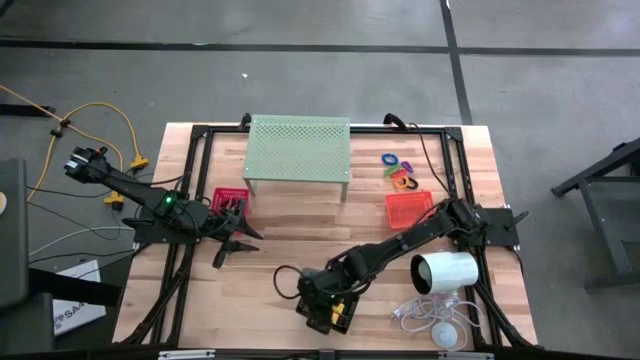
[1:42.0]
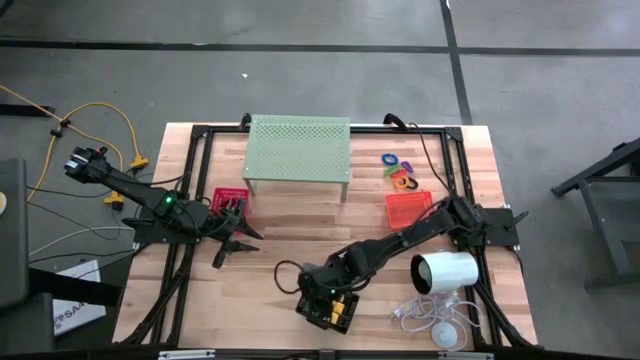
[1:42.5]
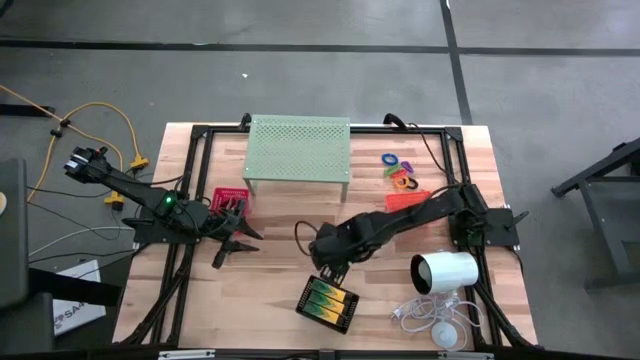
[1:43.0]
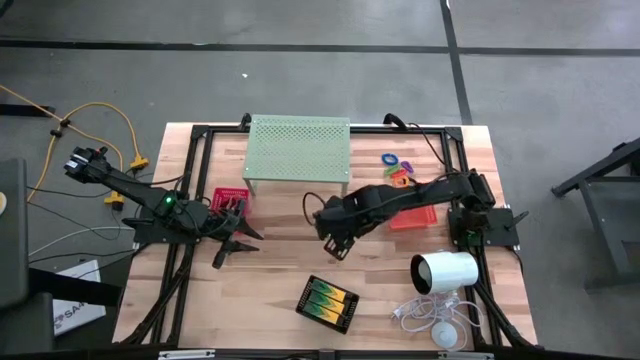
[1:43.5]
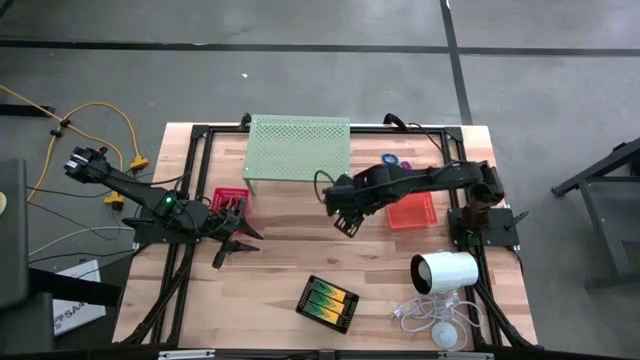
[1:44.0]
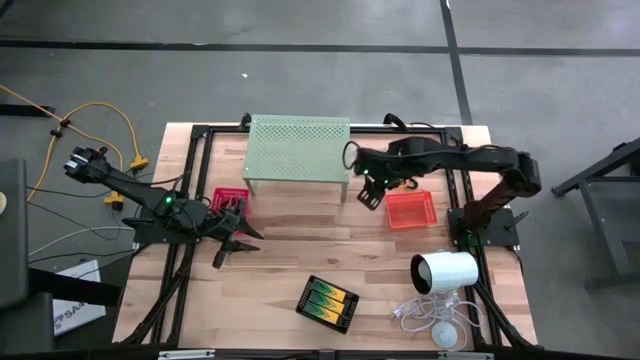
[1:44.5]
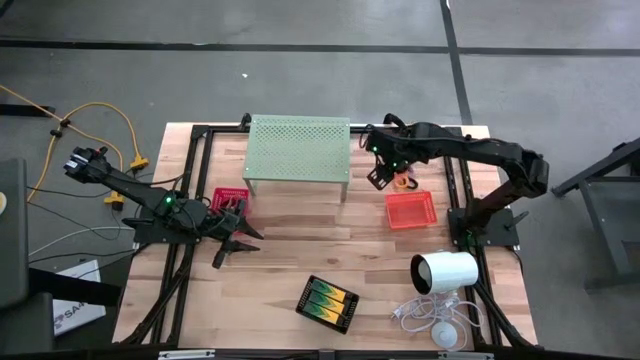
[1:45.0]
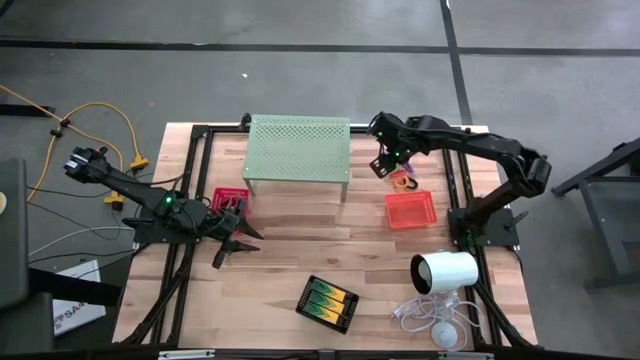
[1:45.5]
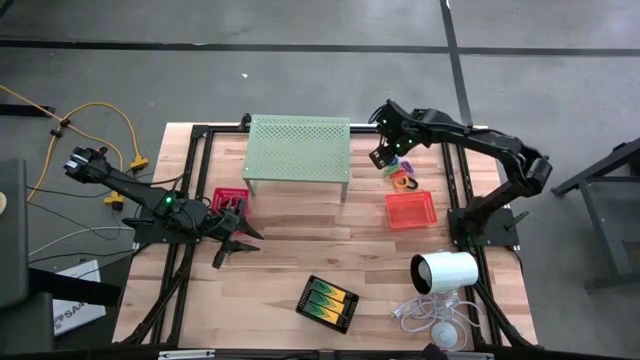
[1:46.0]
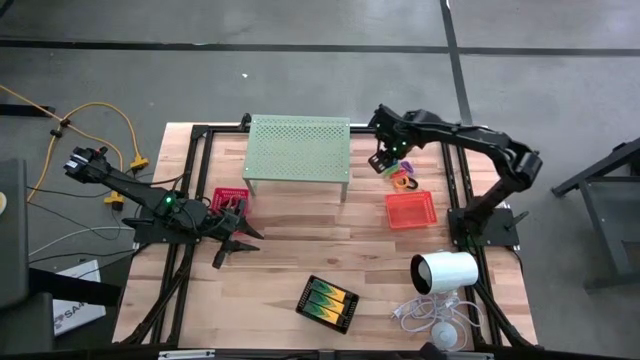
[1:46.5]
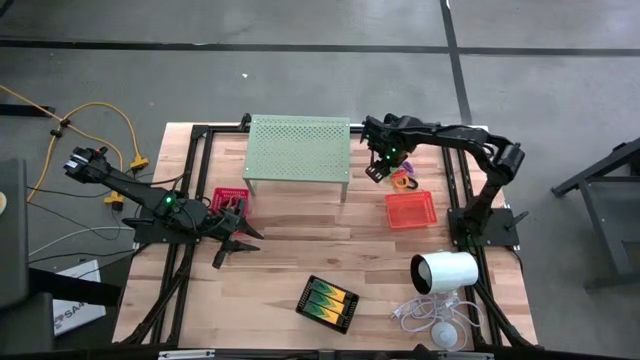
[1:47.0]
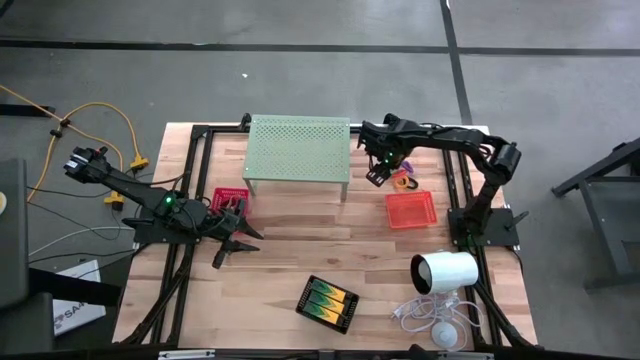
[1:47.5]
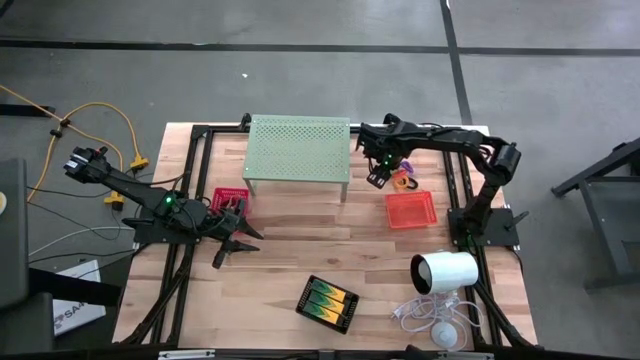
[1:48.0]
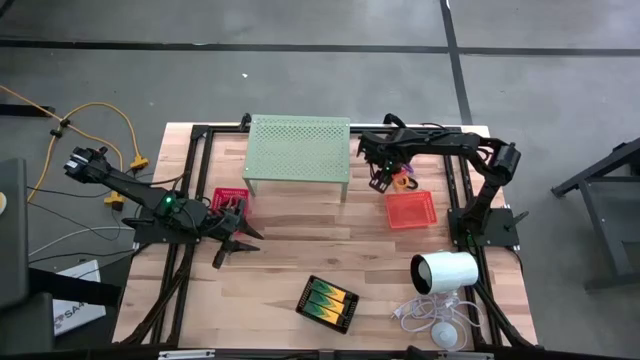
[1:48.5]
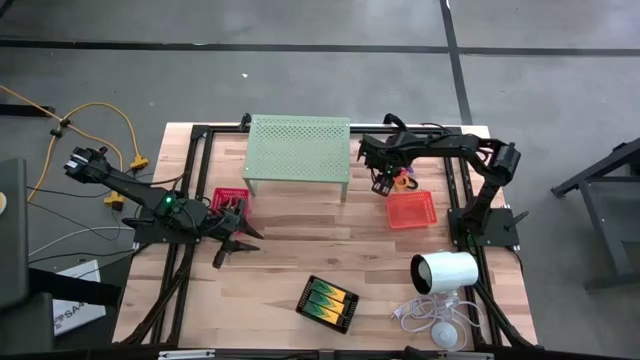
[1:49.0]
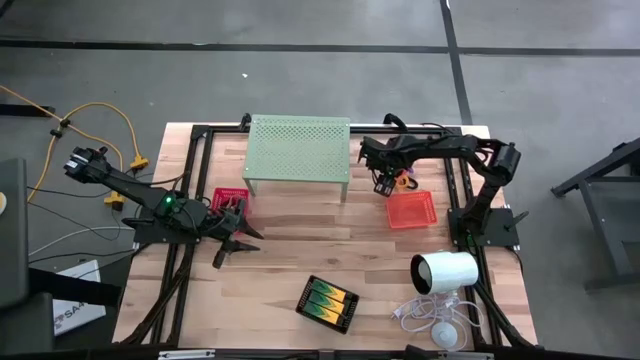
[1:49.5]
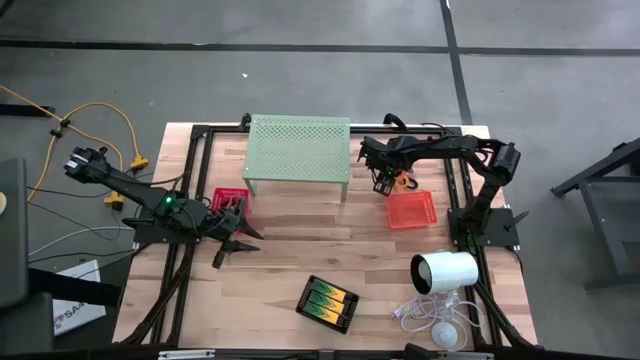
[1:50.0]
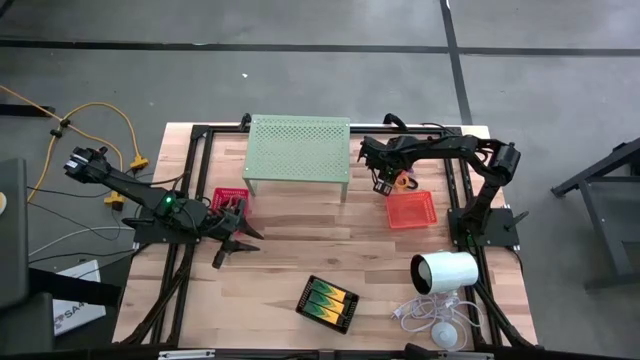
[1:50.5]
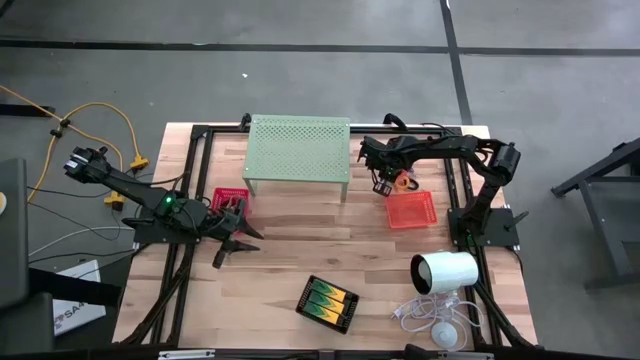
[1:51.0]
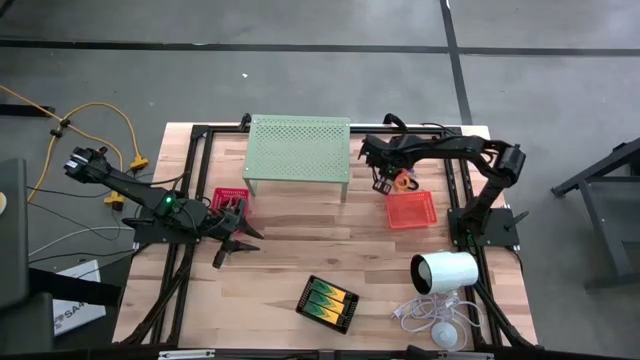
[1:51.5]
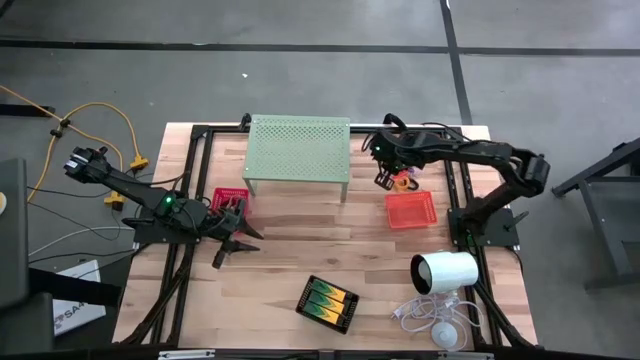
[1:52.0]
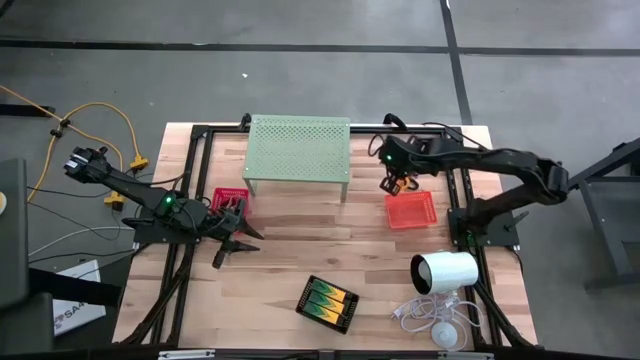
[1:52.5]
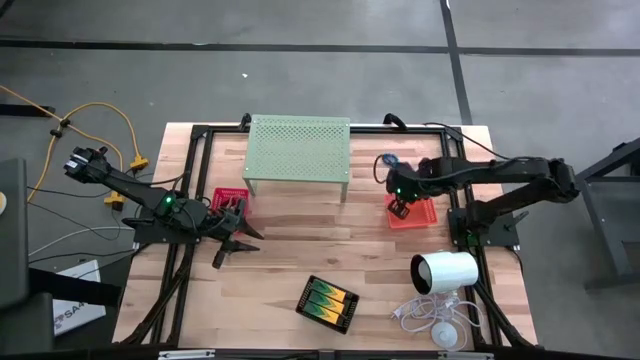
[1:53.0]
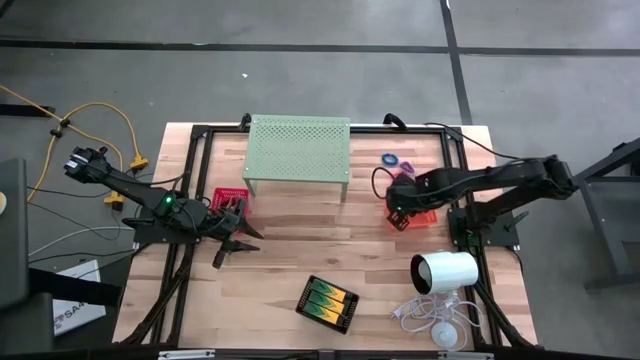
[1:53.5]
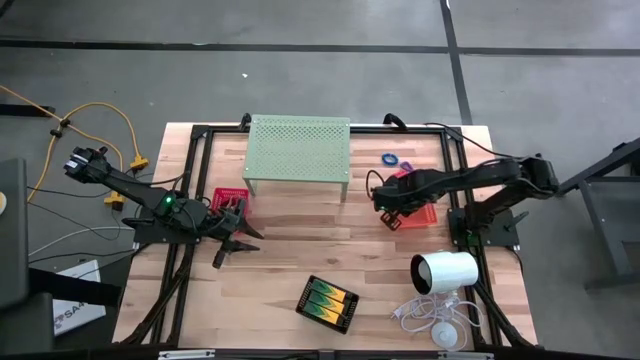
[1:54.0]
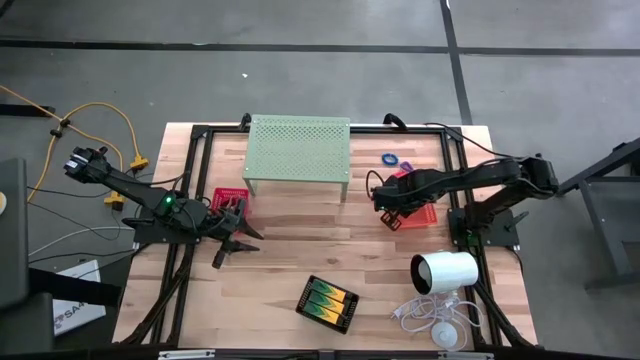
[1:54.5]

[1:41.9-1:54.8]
Task: Pick & Place Office Desk Supplies
Put the green spring keychain into the orange bin

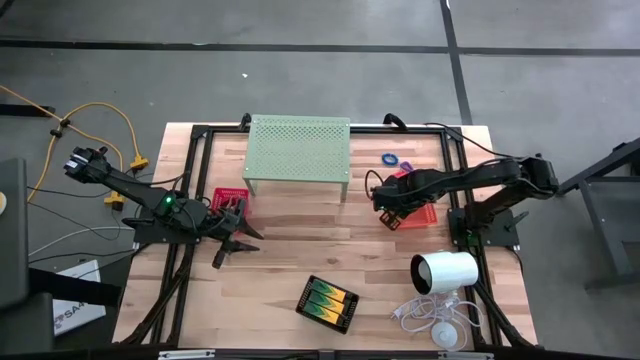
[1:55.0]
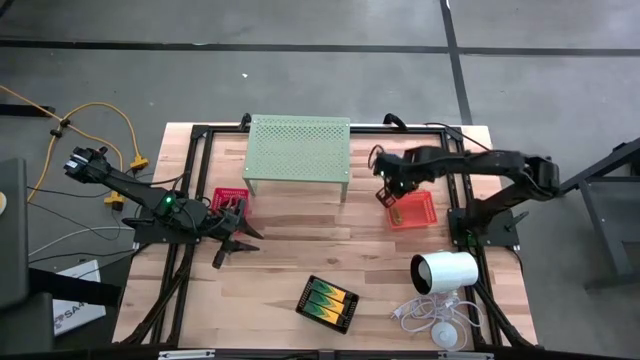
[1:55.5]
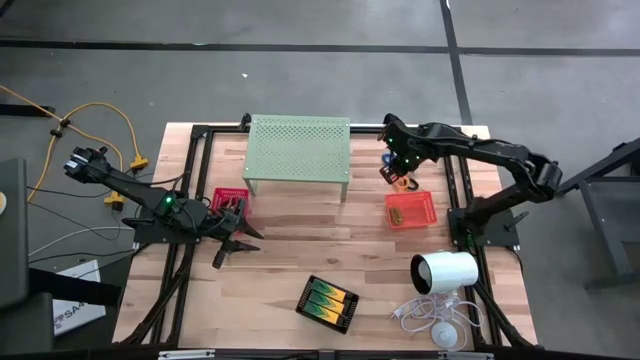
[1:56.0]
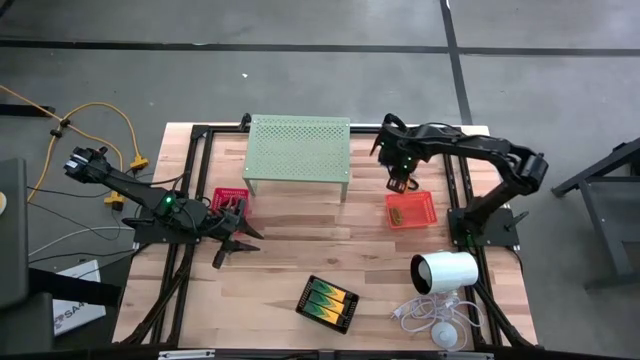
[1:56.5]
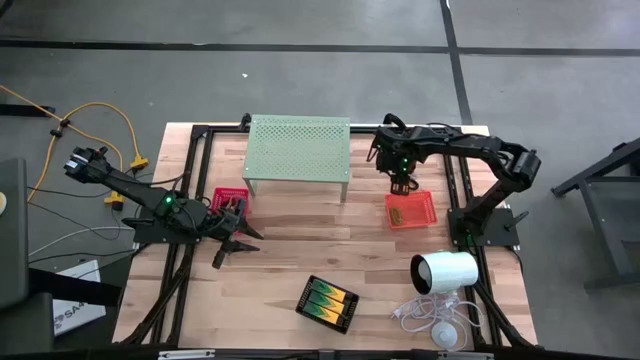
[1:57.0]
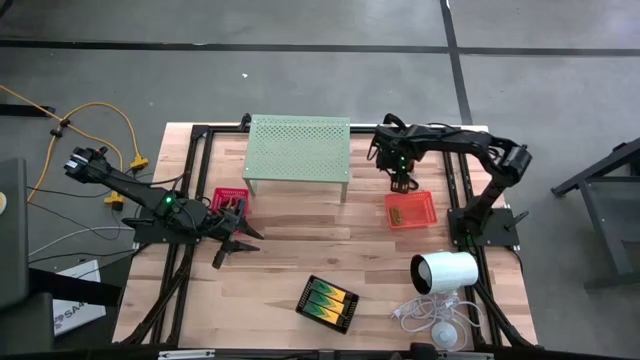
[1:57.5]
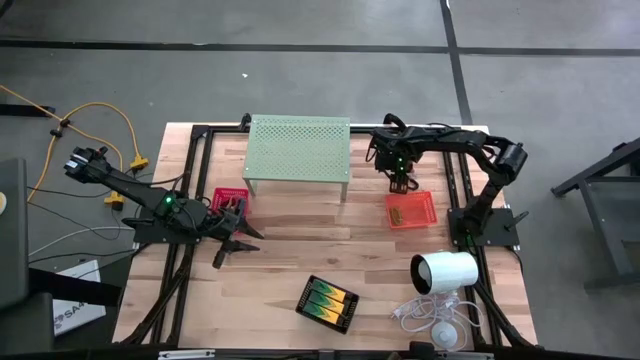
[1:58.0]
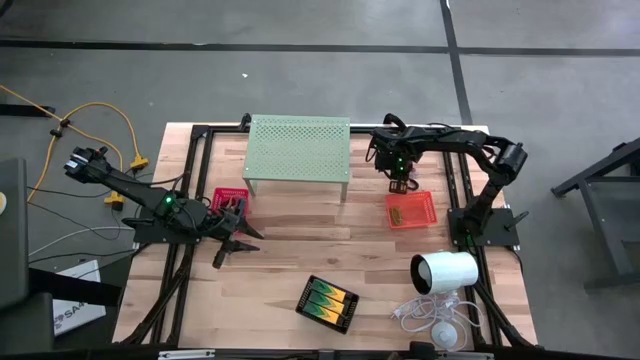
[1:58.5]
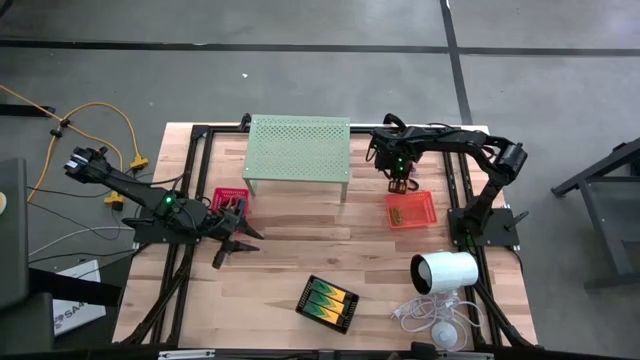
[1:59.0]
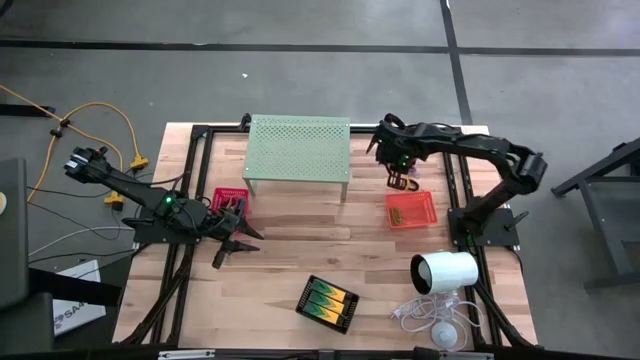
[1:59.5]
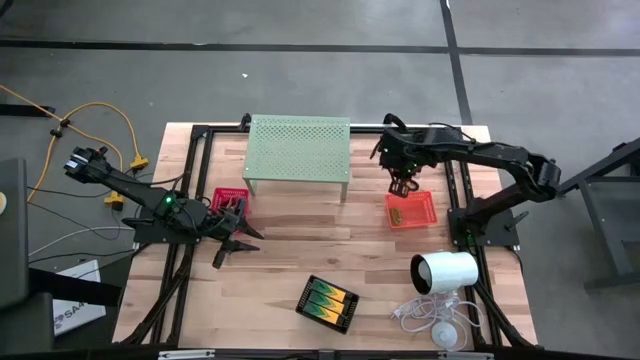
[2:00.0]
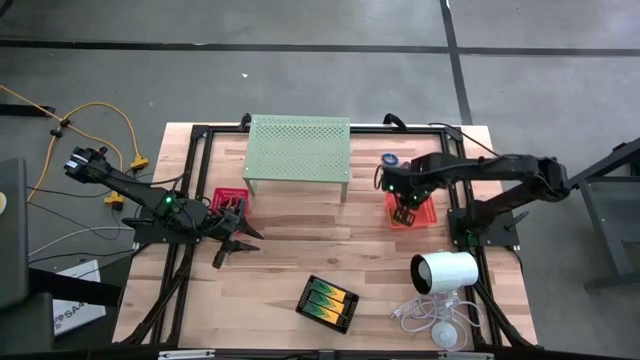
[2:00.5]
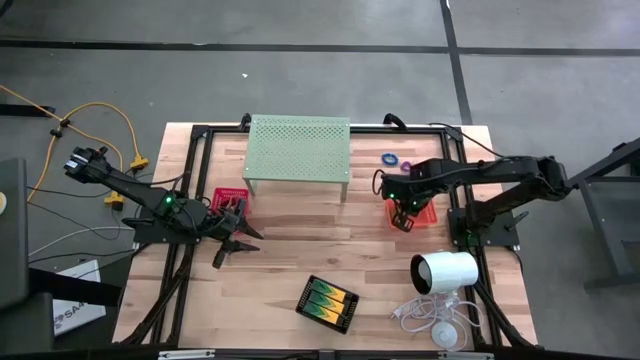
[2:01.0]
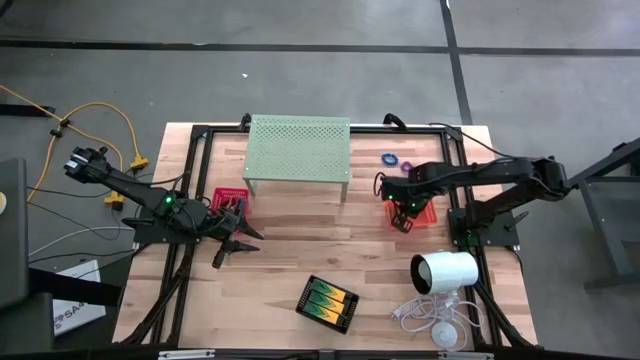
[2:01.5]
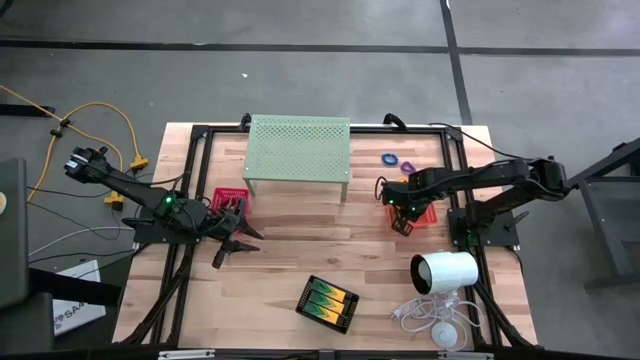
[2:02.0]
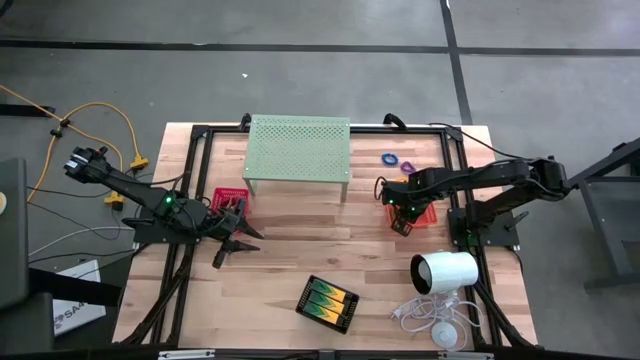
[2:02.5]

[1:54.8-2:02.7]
Put the red spring keychain into the orange bin

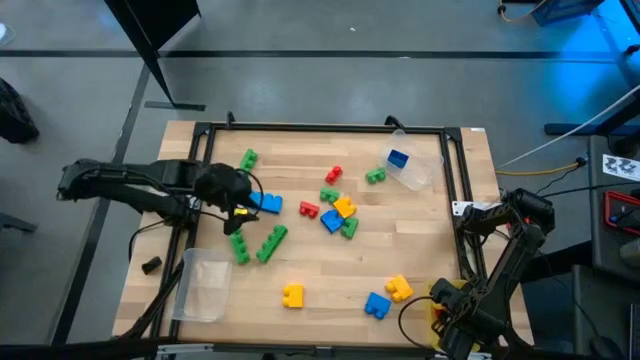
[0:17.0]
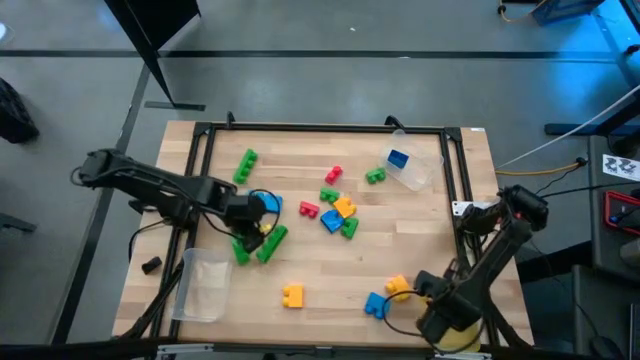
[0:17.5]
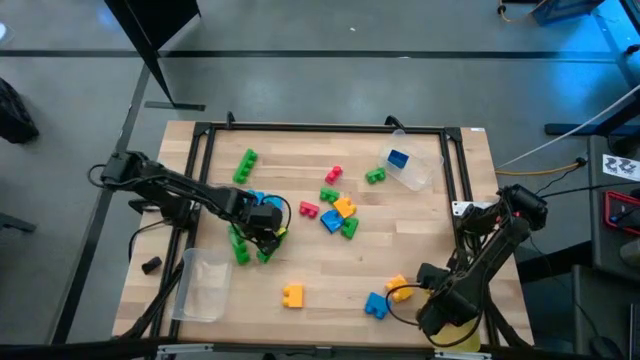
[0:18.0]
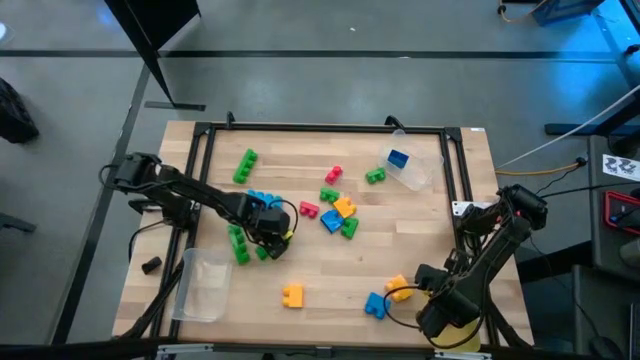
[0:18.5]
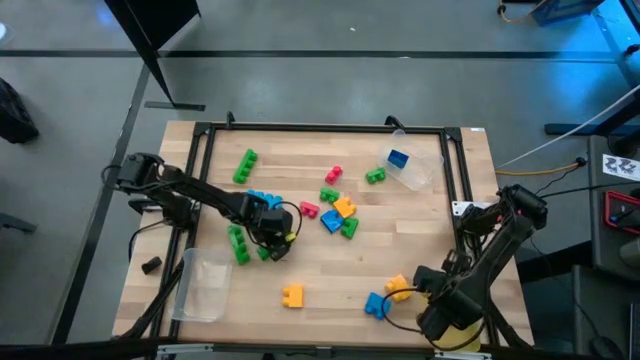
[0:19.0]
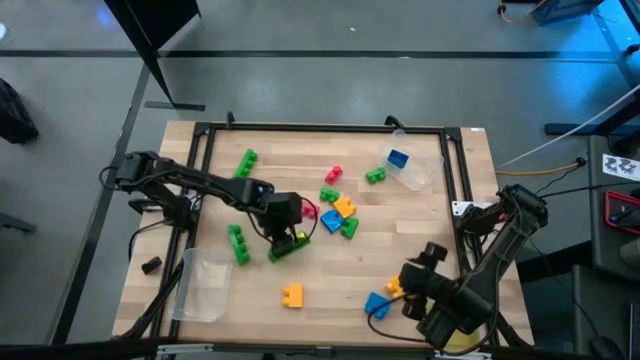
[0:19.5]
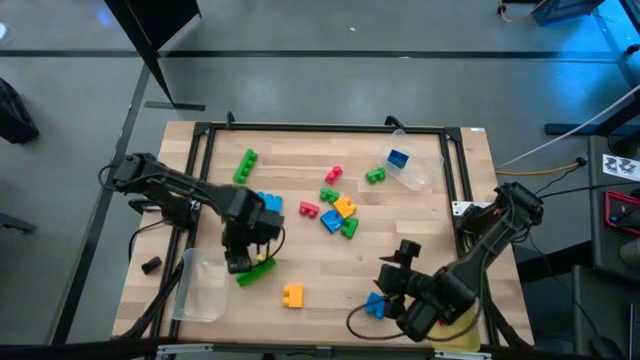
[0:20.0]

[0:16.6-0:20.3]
Task: Sort blocks by size
Put the bottom right 4 stud green game piece into the bottom transparent bin
